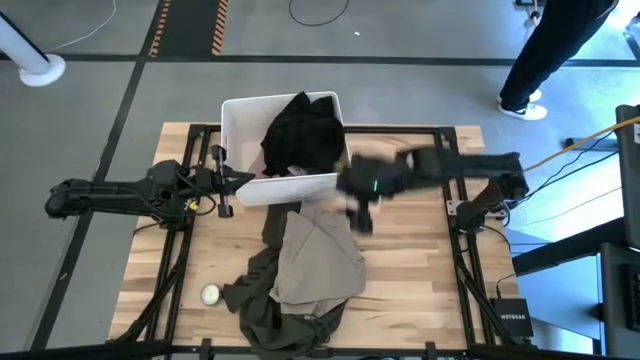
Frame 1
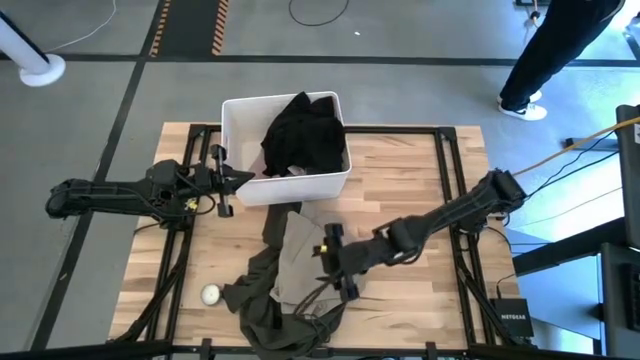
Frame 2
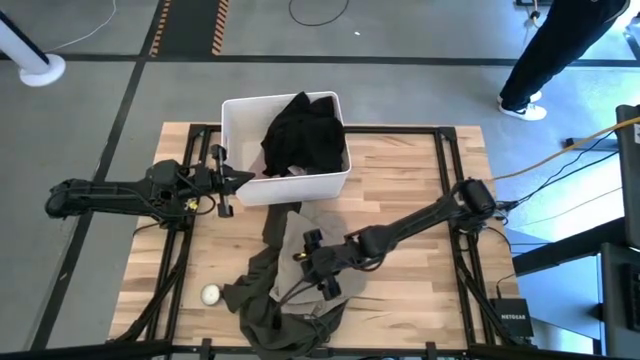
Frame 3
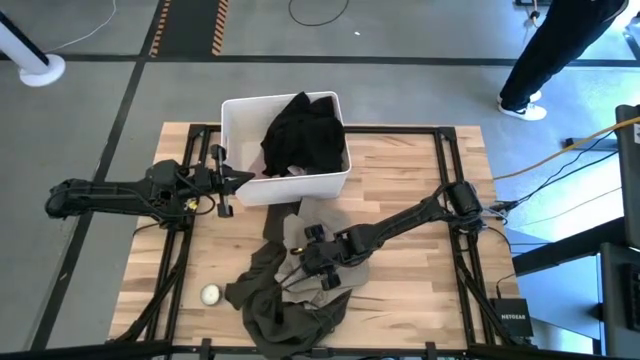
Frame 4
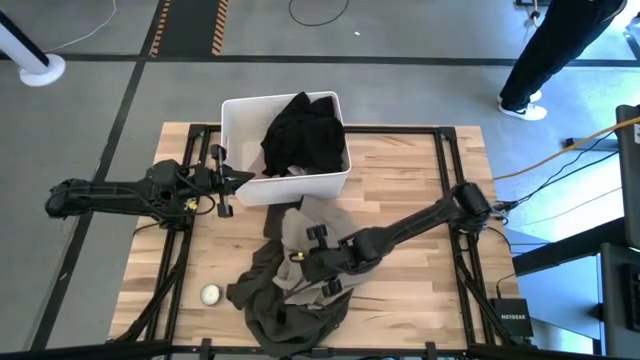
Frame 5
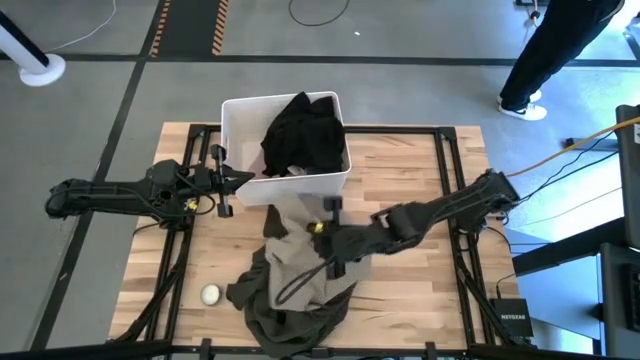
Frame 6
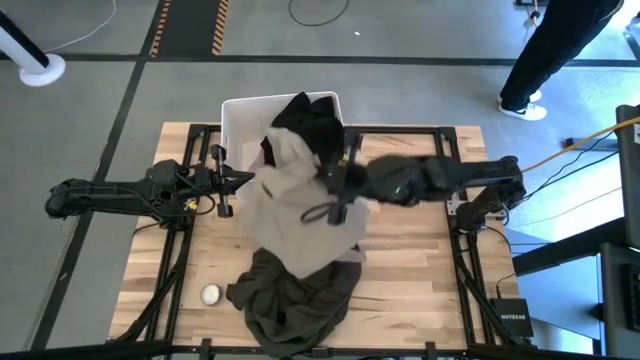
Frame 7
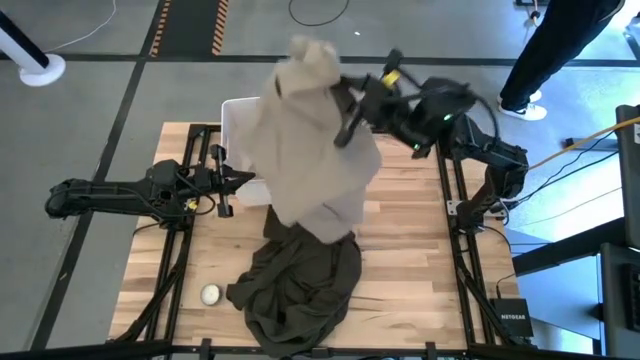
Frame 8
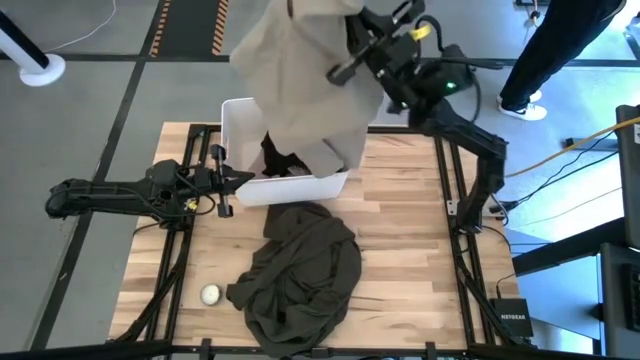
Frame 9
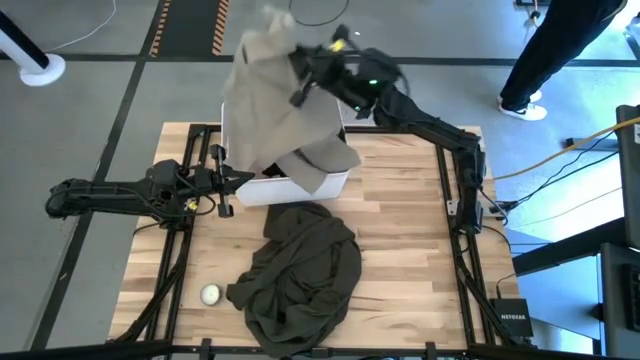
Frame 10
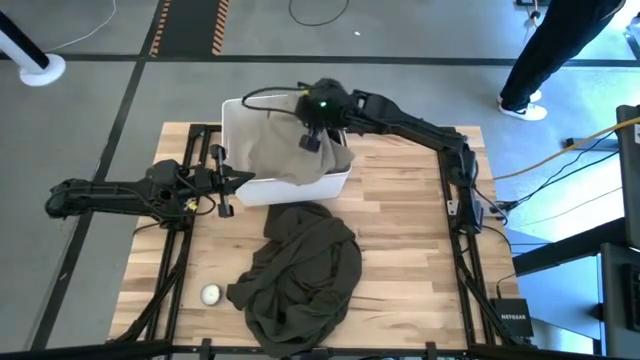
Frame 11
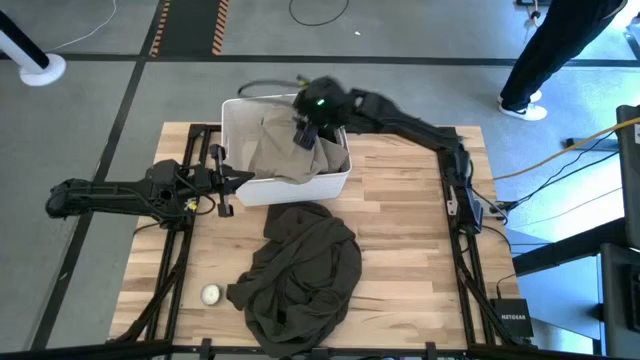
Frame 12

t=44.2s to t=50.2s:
Task: Sort clothes
Put the brown shorts into the white laundry organizer

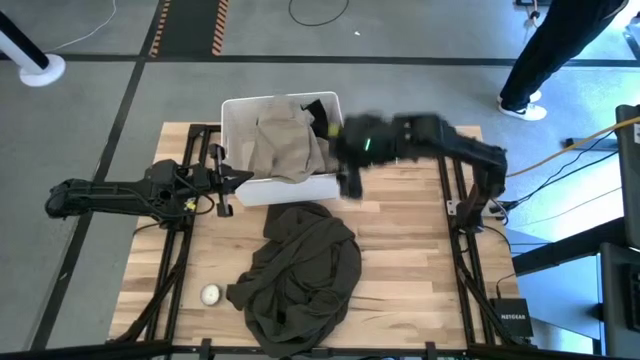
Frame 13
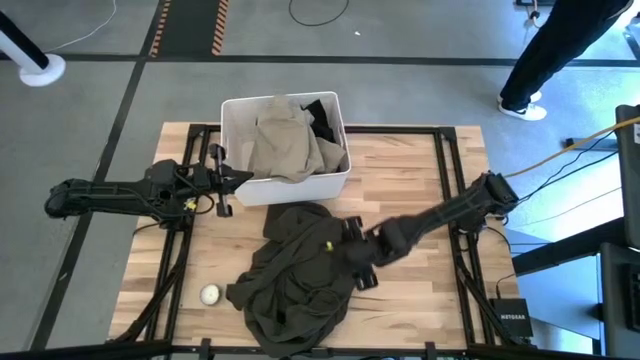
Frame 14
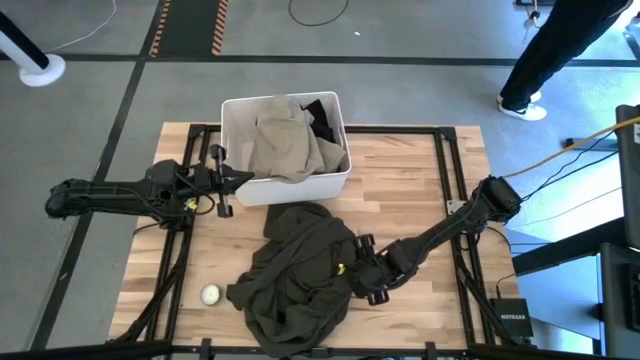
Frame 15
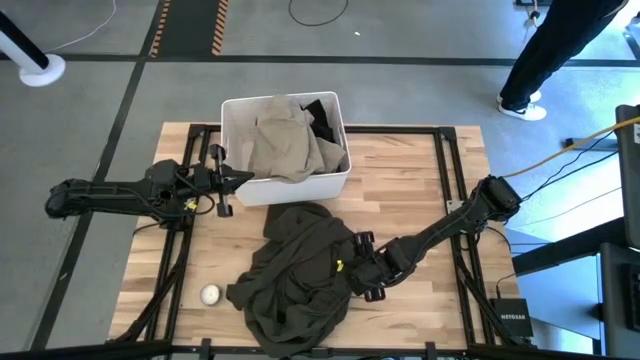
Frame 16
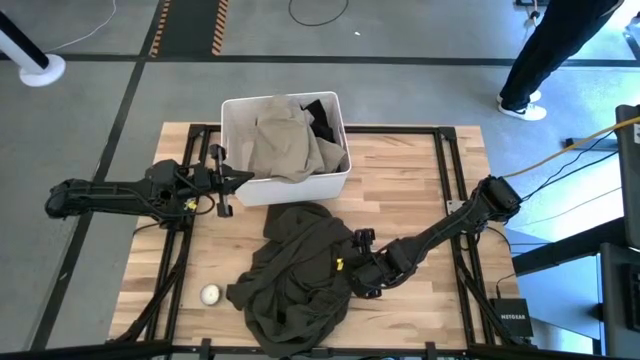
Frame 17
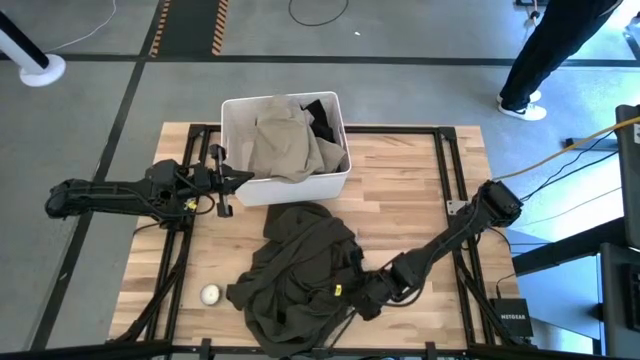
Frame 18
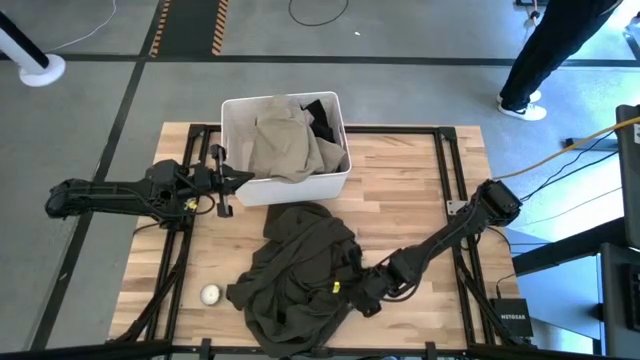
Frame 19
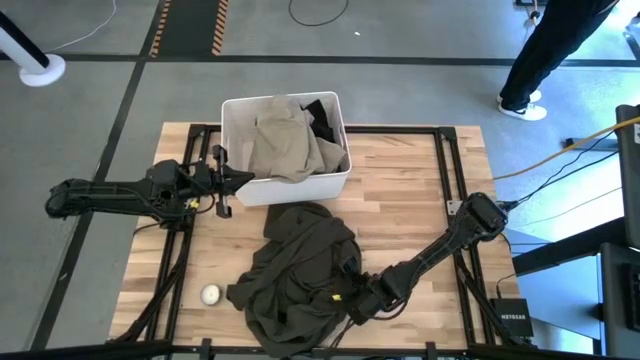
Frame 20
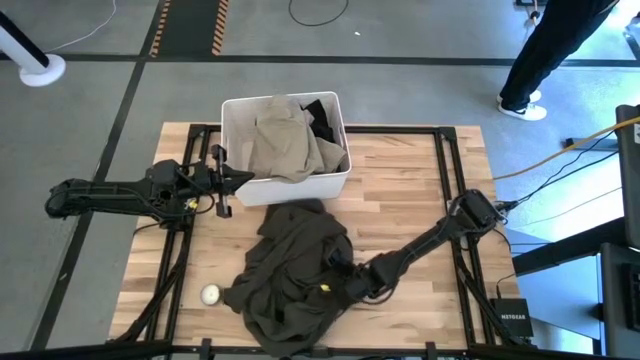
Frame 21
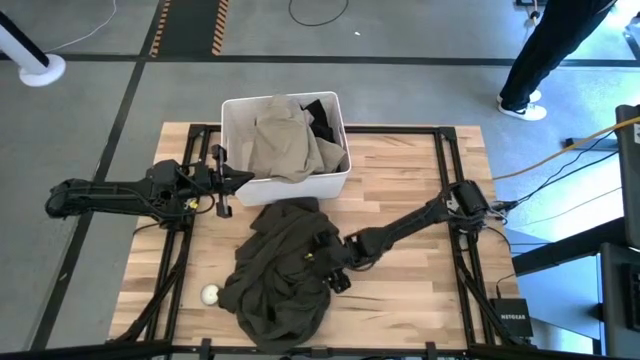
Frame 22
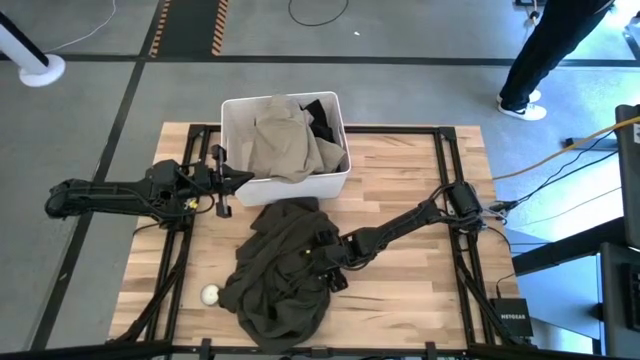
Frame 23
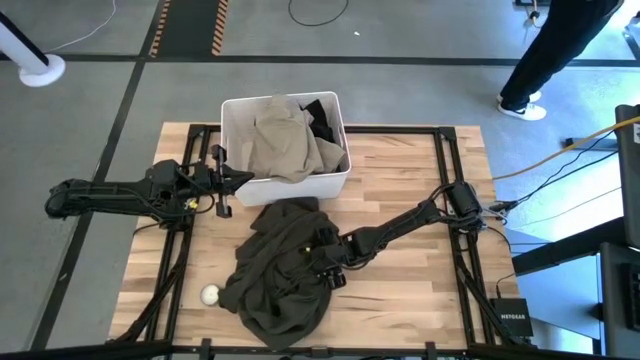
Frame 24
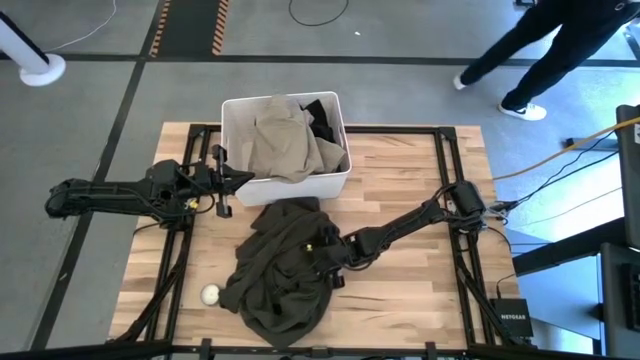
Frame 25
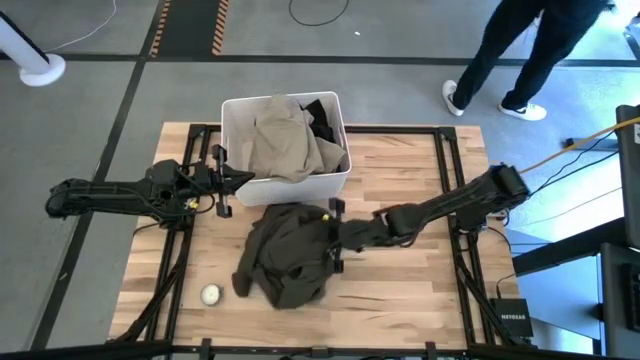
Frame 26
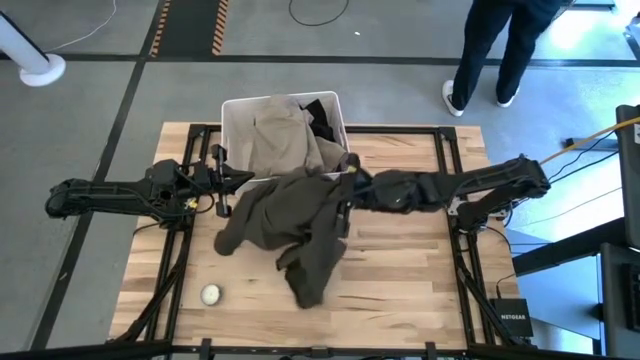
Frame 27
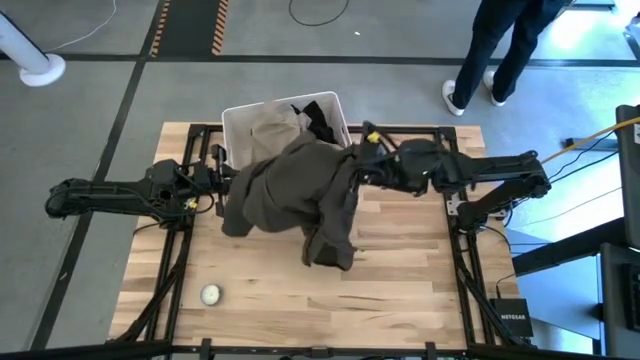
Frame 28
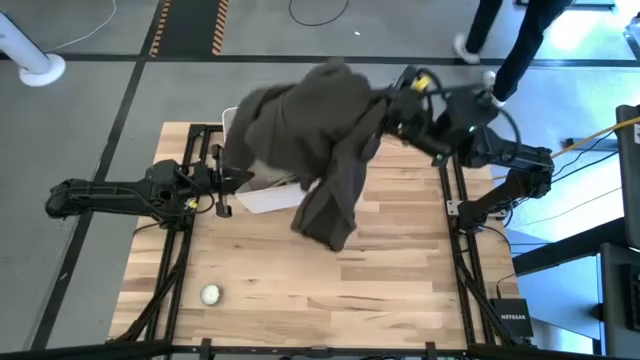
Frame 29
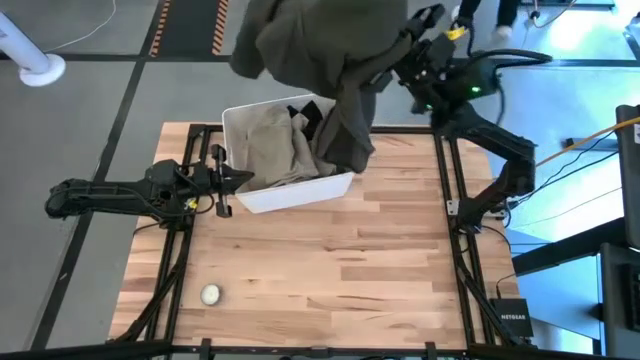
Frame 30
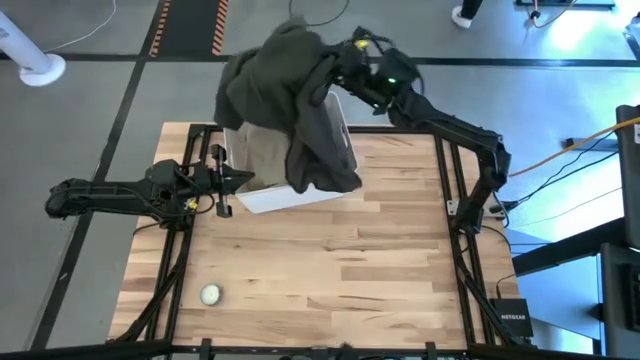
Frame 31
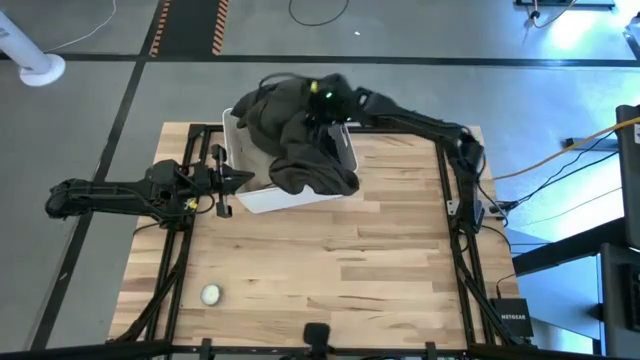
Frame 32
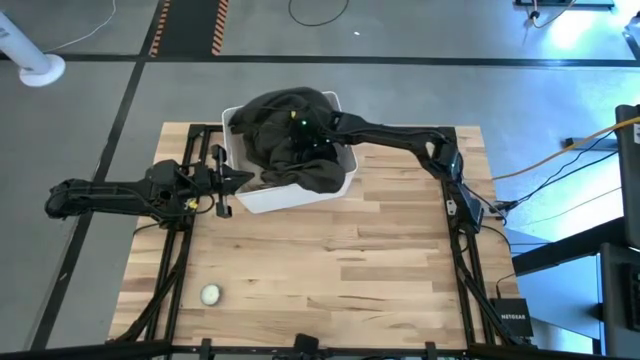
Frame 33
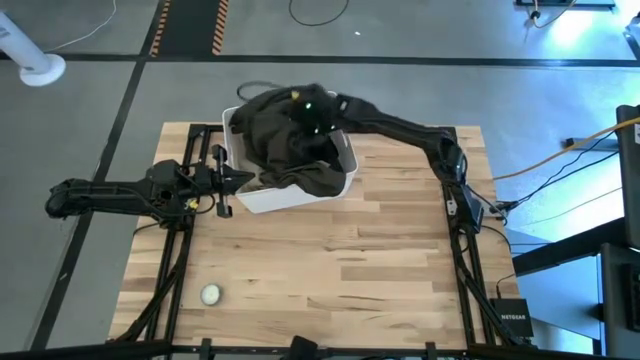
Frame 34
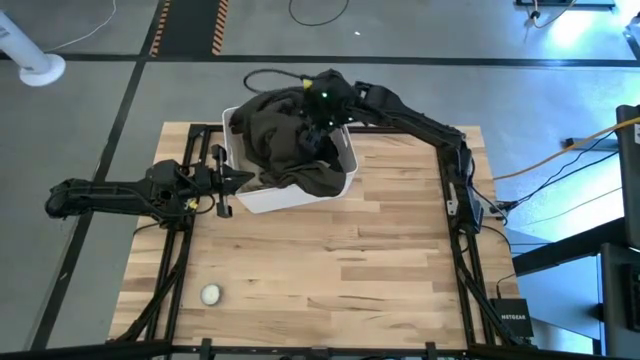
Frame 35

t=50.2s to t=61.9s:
Put the dark green jacket into the white laundry organizer

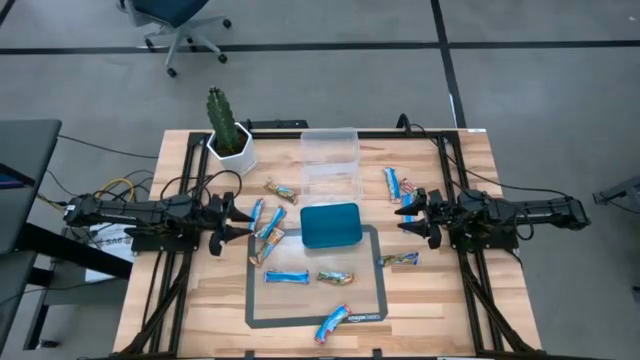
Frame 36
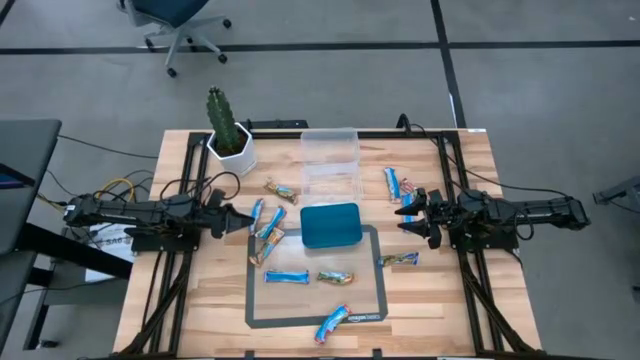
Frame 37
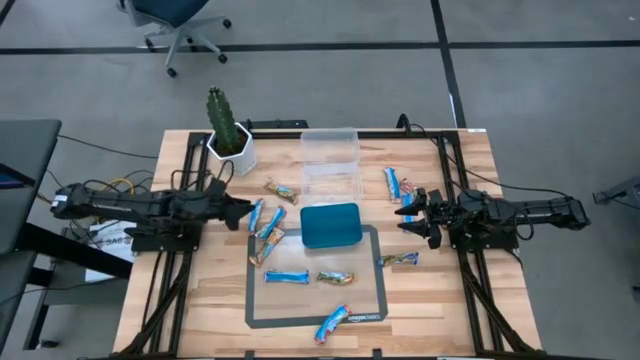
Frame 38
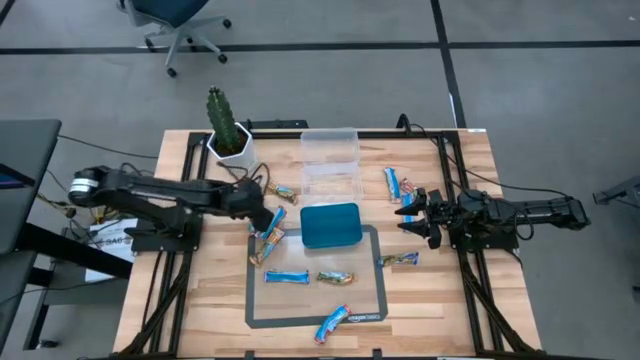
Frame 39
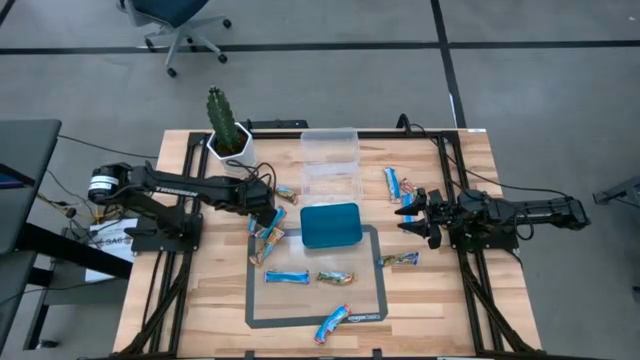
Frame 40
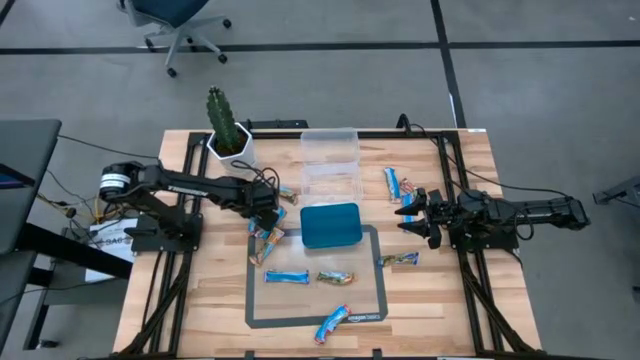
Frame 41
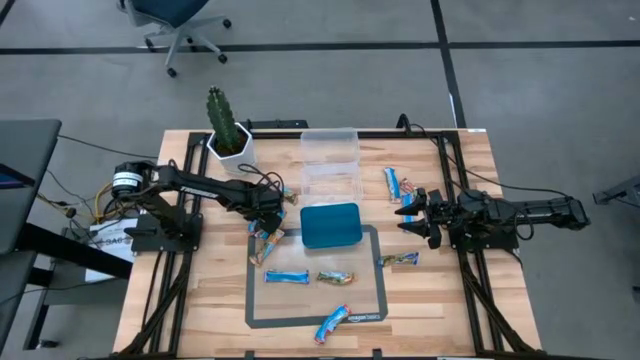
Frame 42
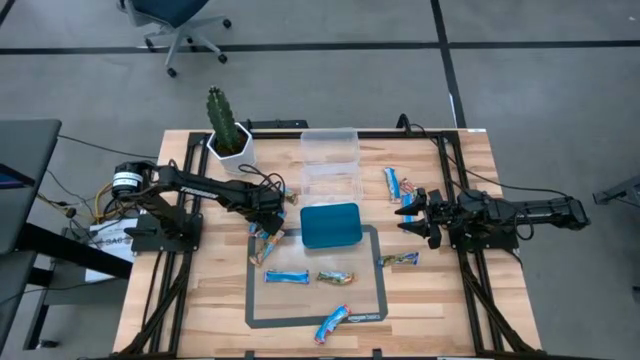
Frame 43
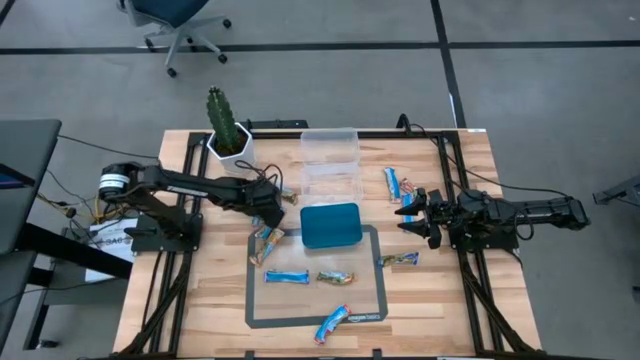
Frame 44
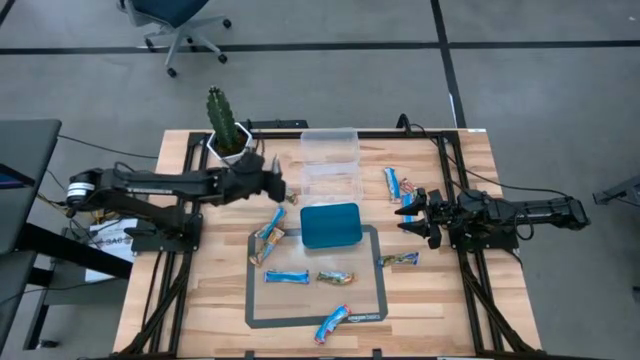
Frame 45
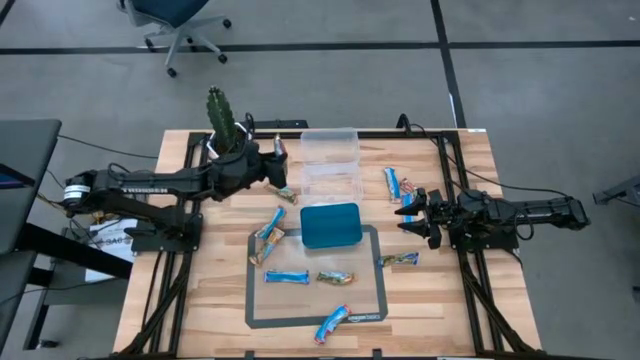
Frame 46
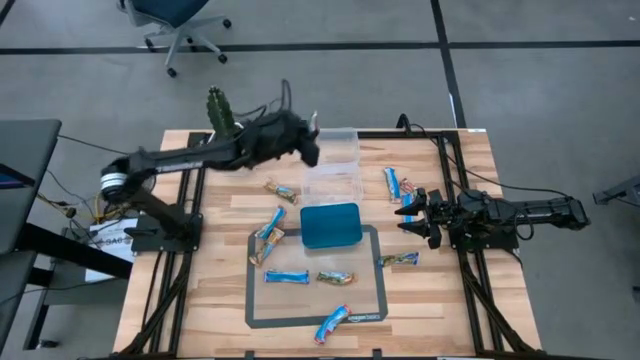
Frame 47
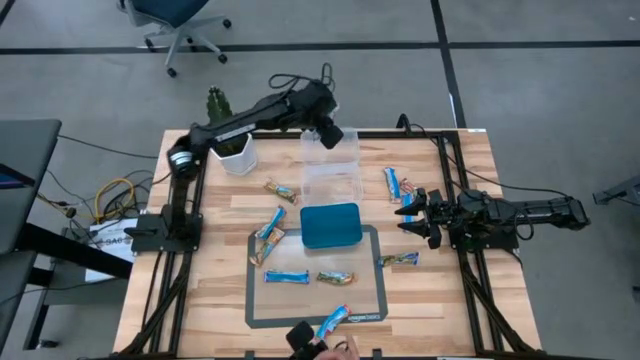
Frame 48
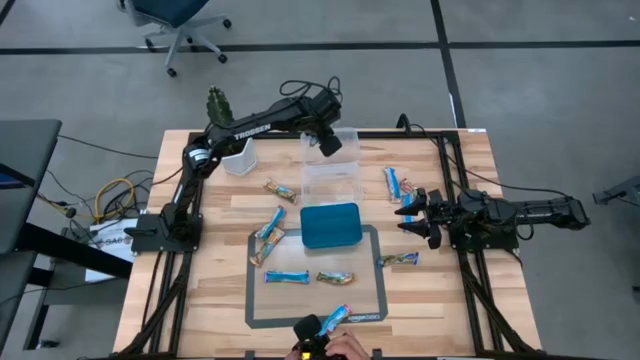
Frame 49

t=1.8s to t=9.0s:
Task: Pick and place Granola Bars by type
Put the red granola bar into the top transparent bin
